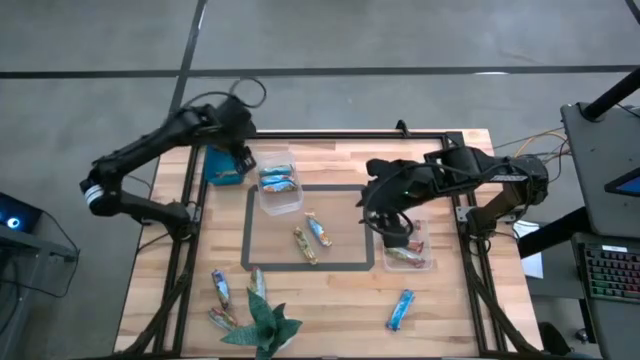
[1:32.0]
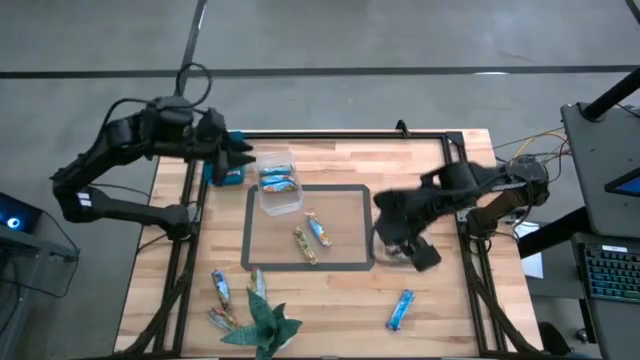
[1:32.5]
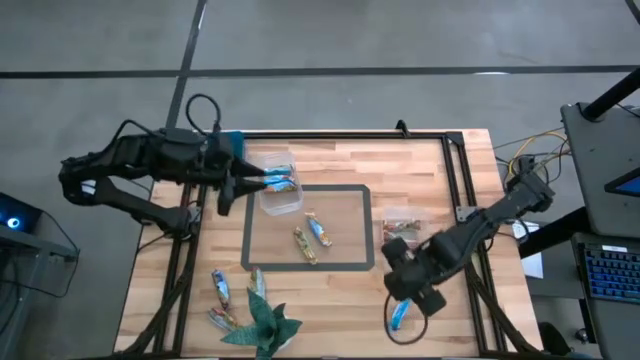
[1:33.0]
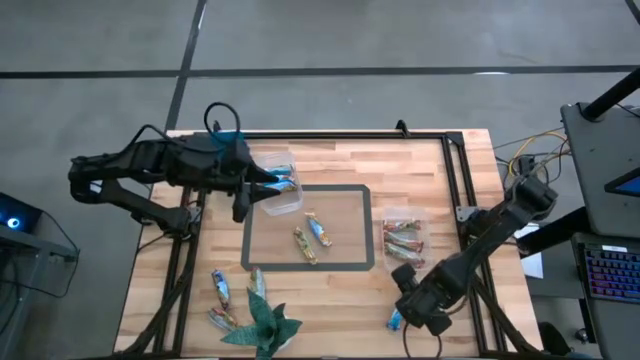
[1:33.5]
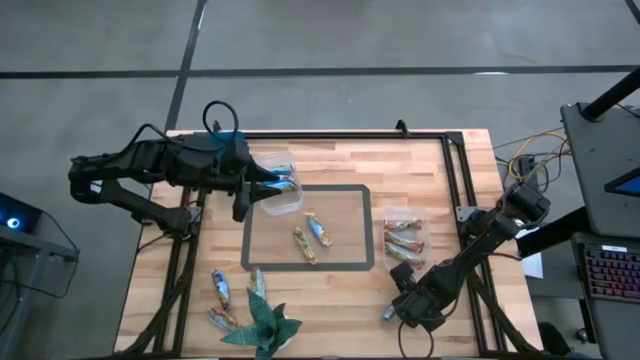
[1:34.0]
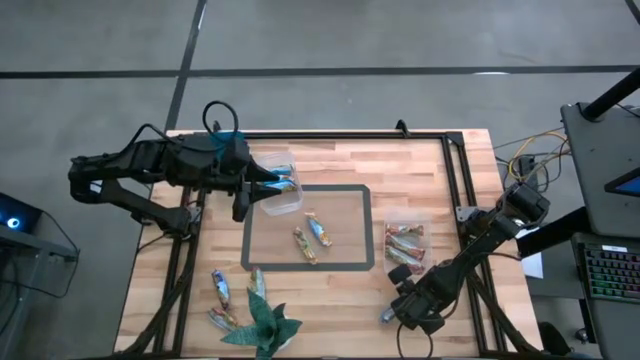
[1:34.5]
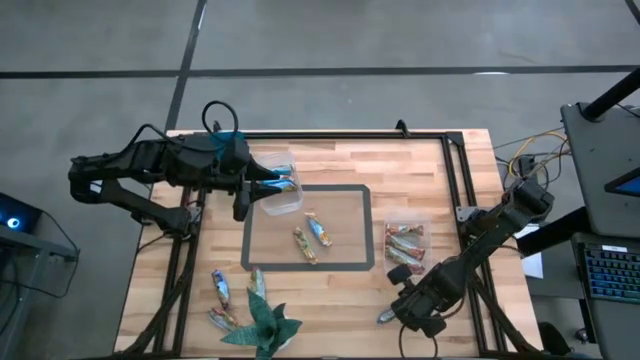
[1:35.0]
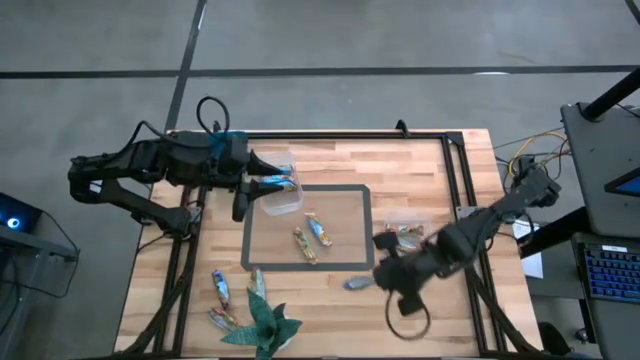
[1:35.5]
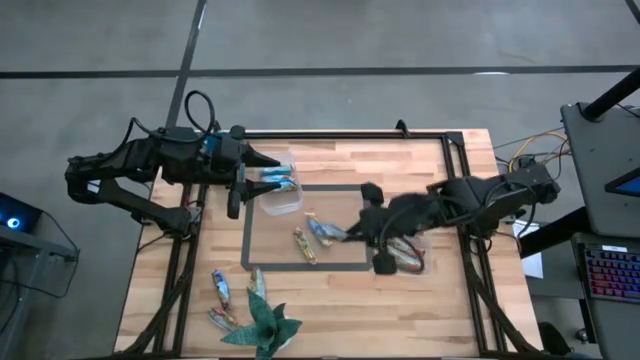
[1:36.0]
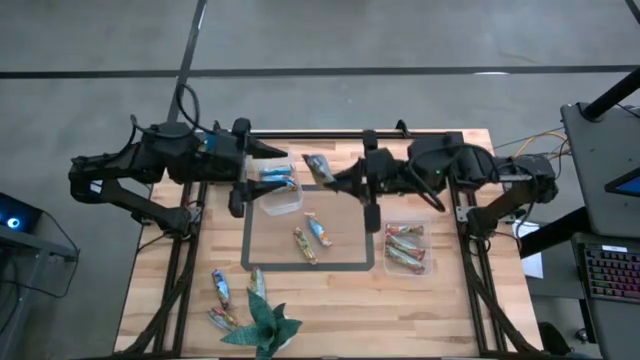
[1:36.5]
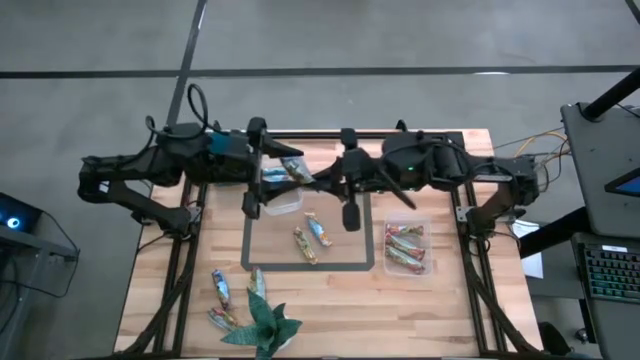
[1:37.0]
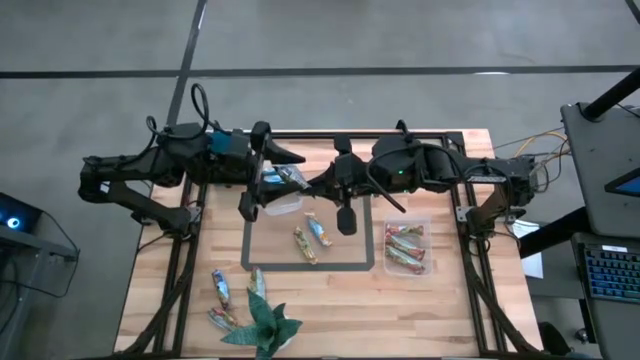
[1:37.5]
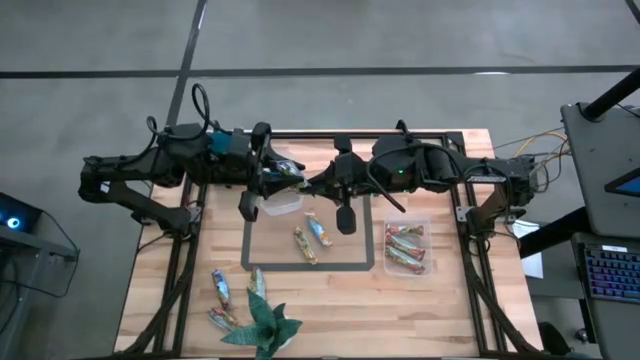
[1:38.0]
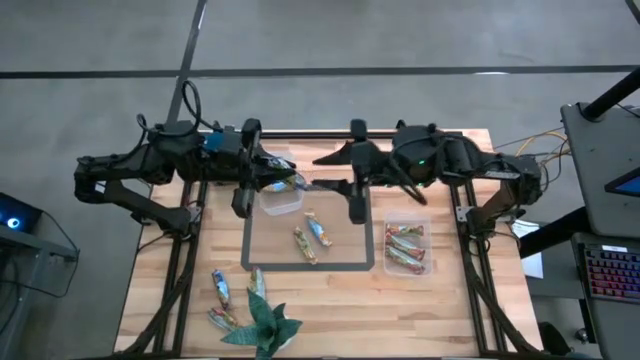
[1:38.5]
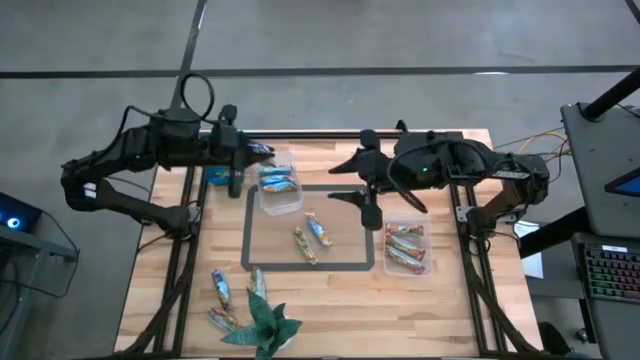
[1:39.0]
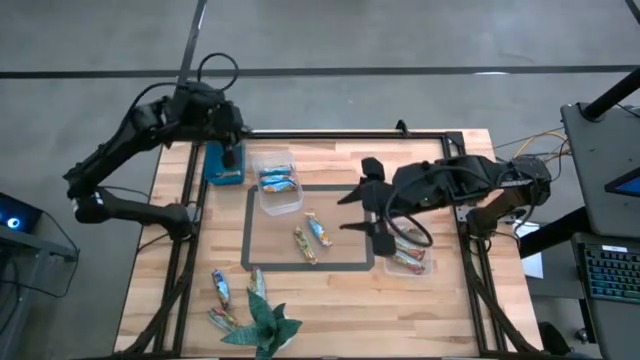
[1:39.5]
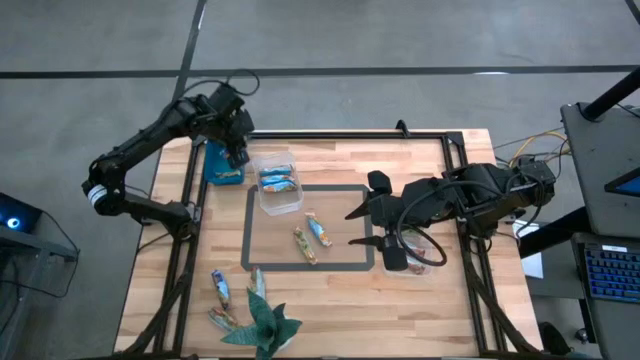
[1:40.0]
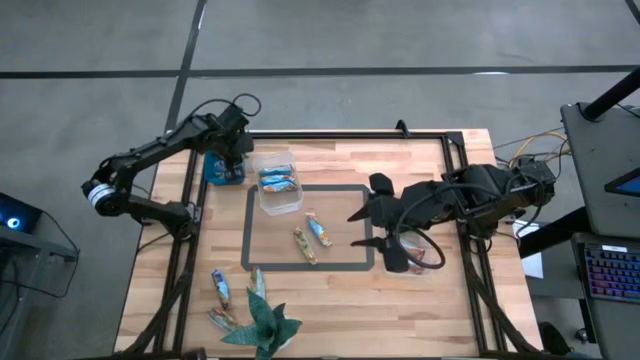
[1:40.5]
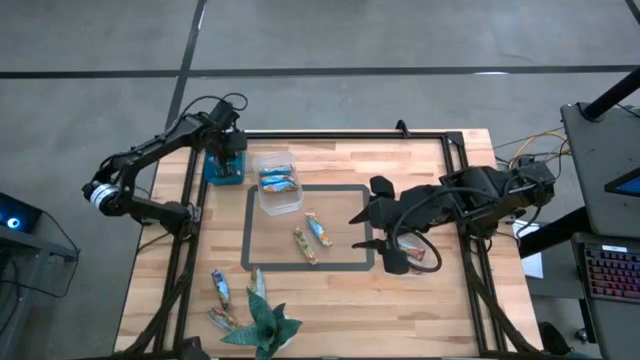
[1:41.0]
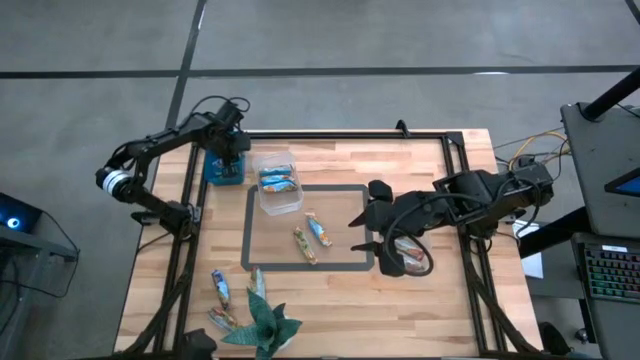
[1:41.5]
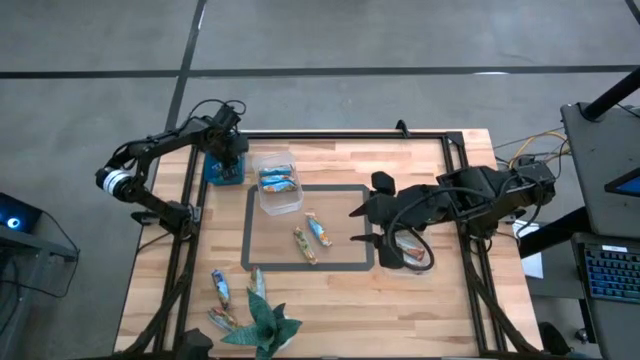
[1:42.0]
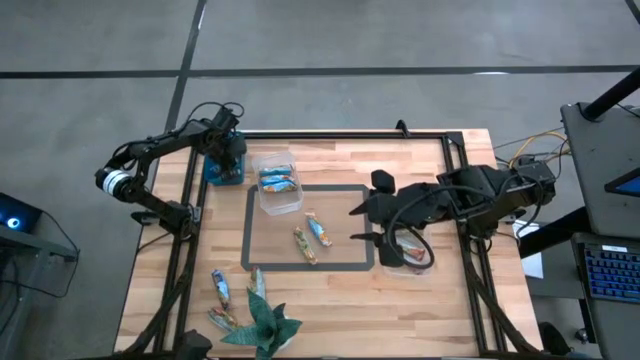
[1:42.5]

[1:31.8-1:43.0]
Task: Pick and place Granola Bars by type
Put the blue granola bar into the blue bin

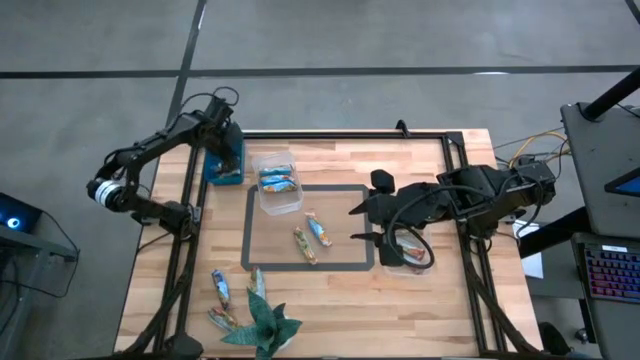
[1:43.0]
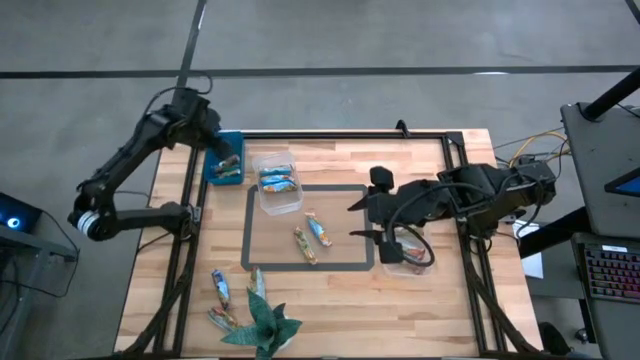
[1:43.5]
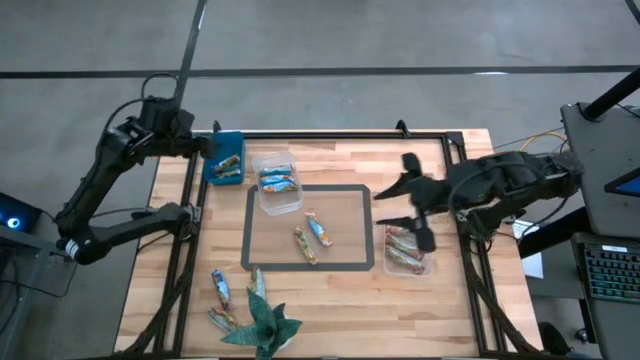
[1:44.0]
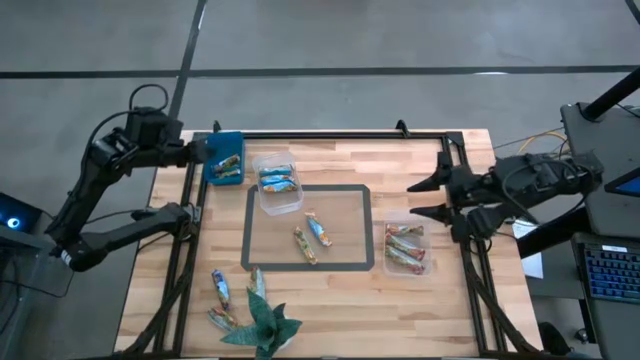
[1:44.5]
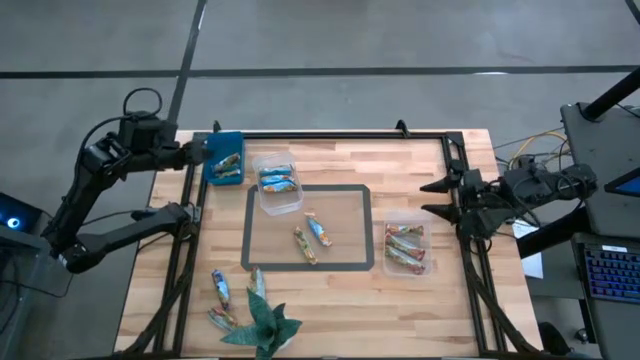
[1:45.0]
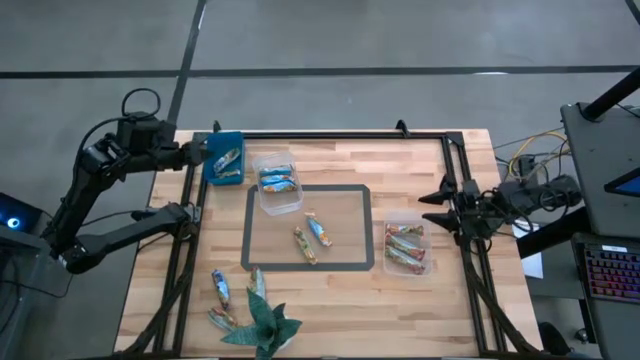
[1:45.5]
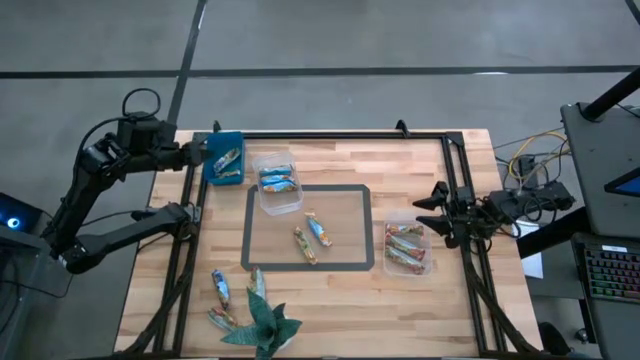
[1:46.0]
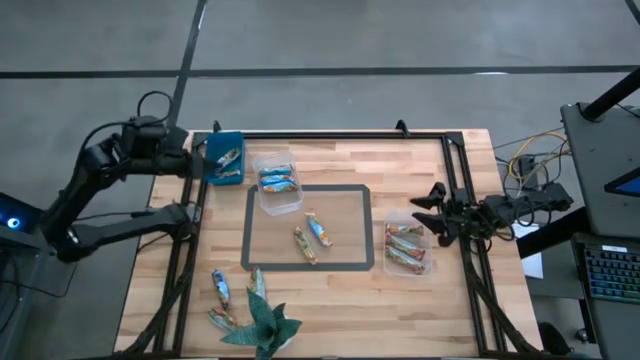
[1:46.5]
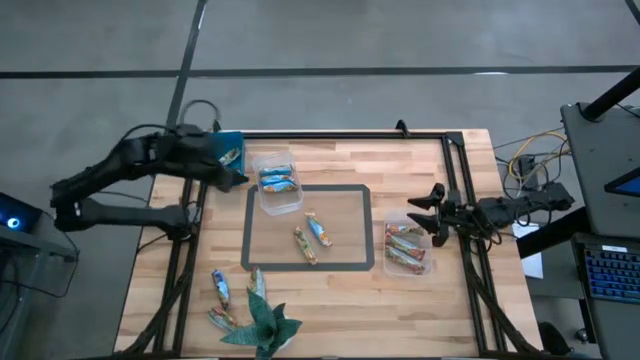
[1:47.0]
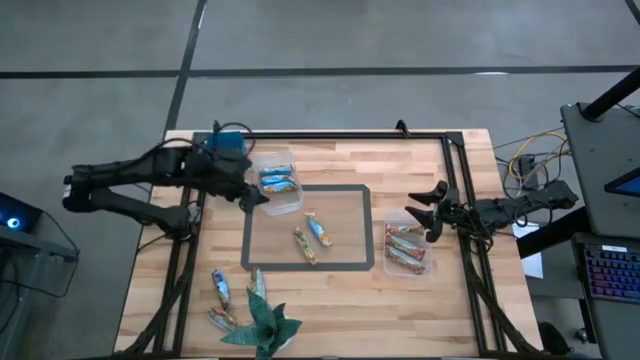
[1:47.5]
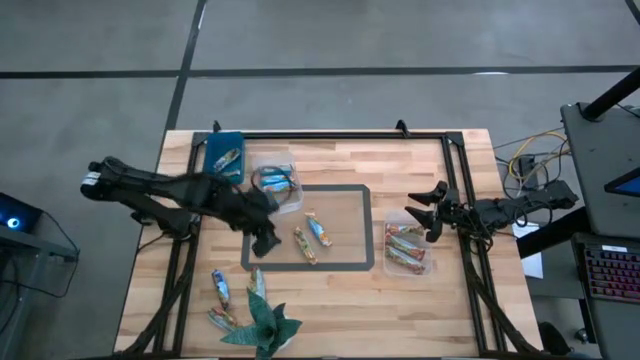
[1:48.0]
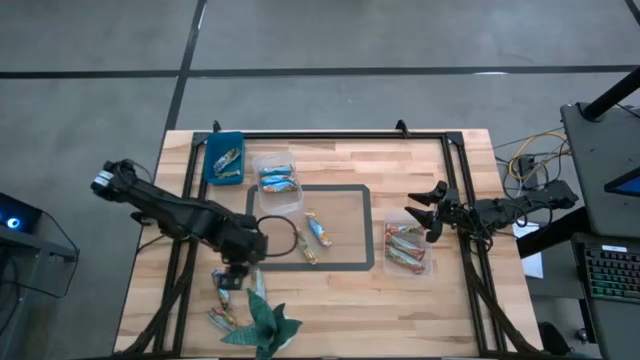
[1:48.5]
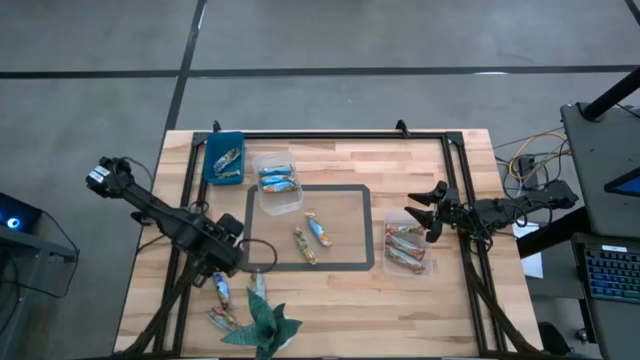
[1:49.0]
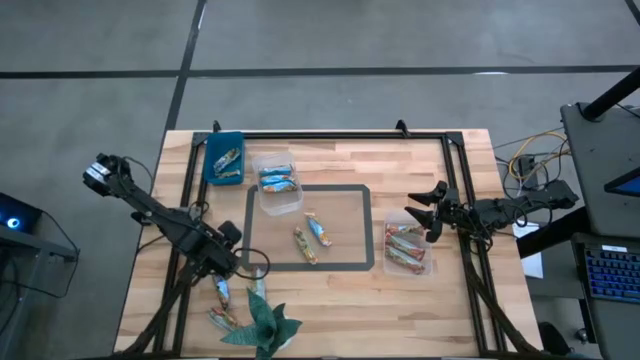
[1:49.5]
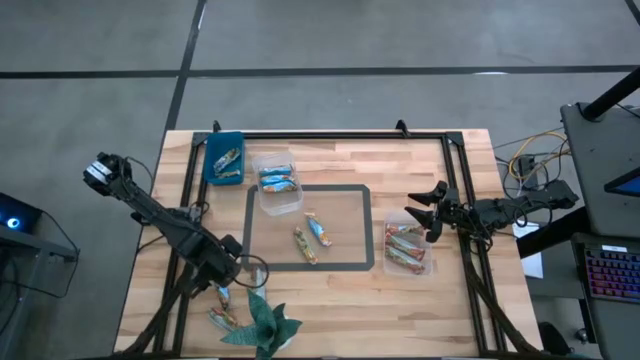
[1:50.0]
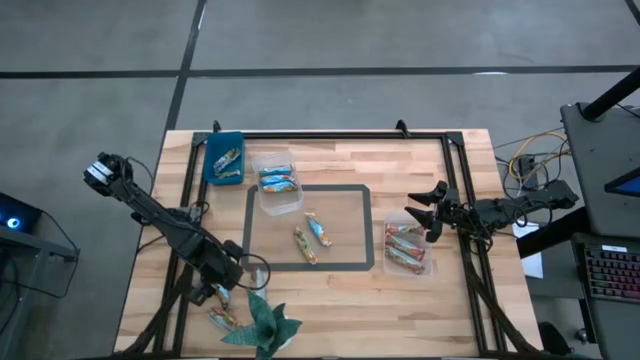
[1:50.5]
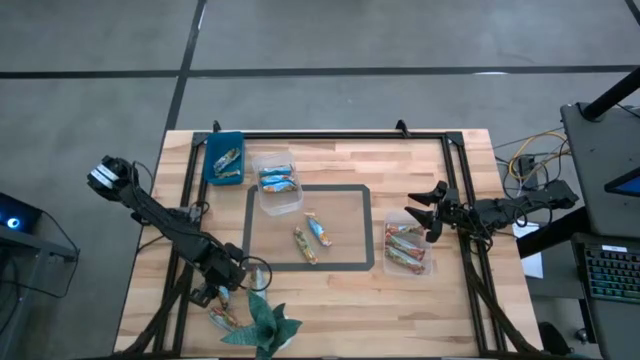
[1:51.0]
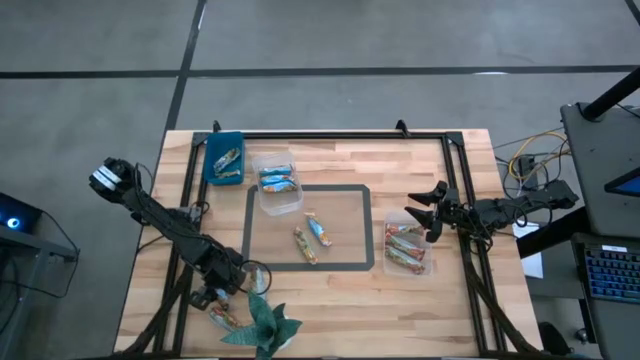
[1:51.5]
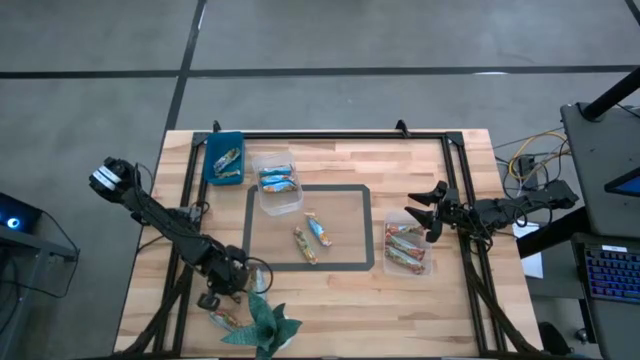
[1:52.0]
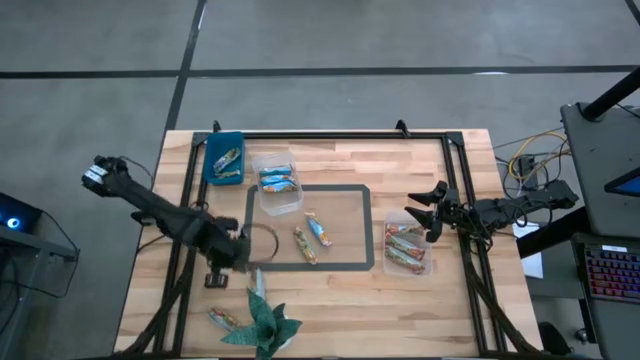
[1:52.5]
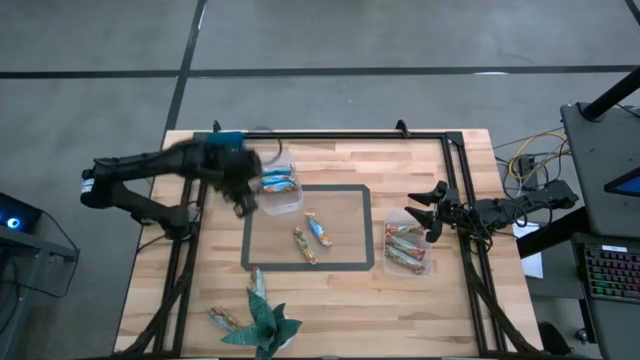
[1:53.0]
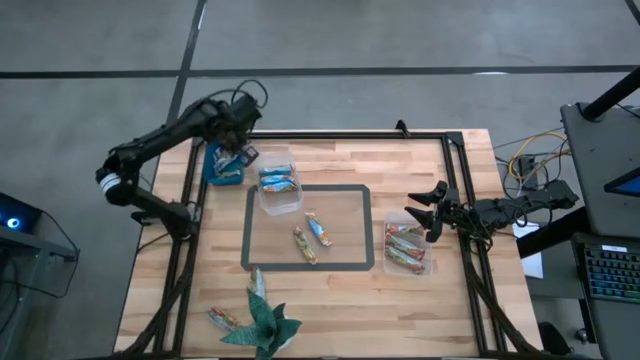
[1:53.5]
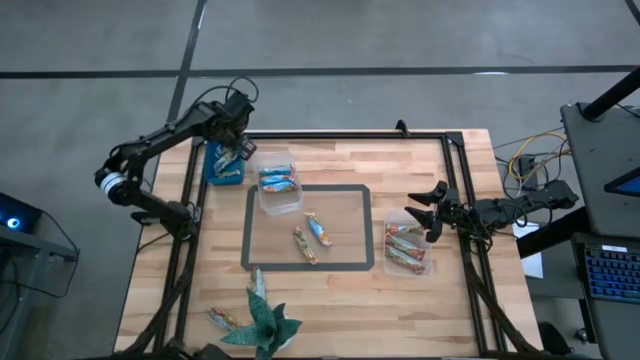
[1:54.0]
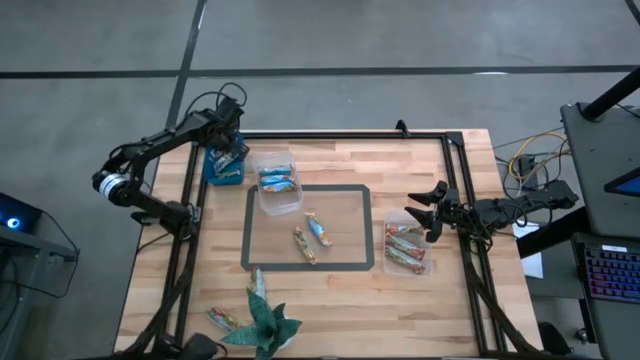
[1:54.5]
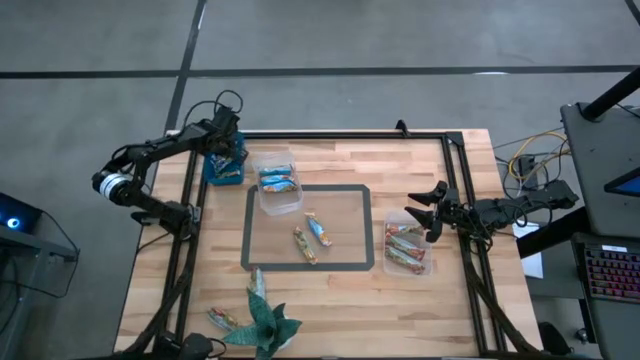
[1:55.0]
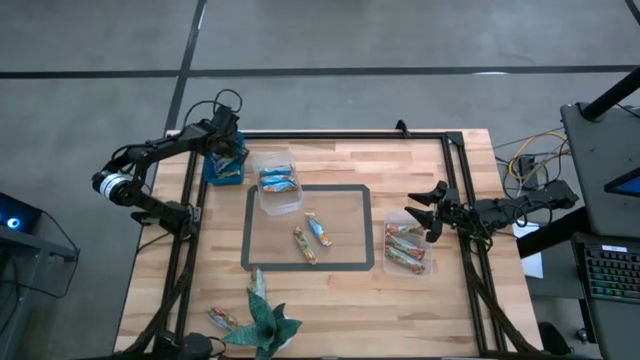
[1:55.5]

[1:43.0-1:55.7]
Put the blue granola bar into the blue bin
